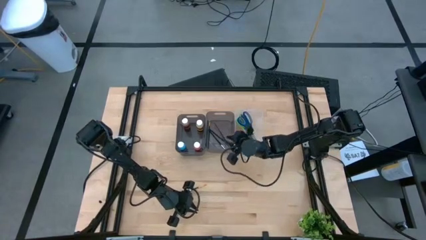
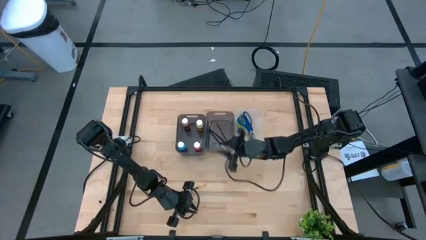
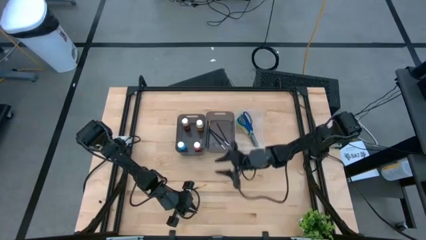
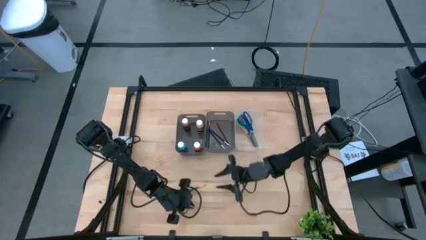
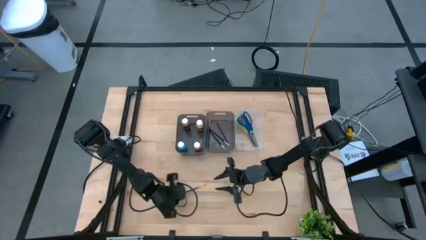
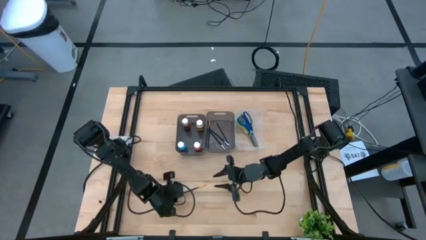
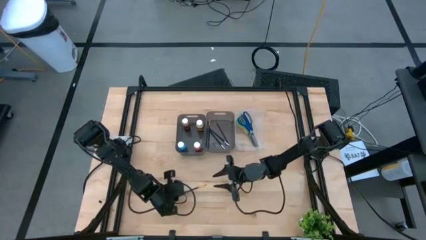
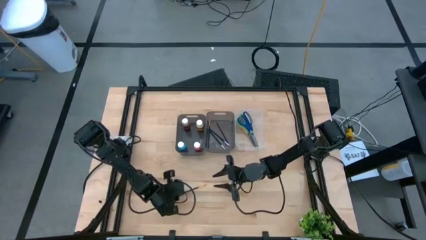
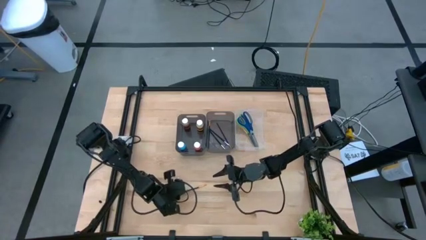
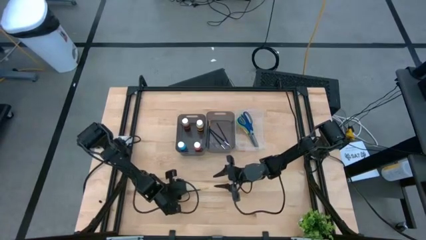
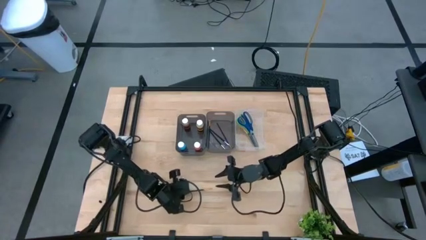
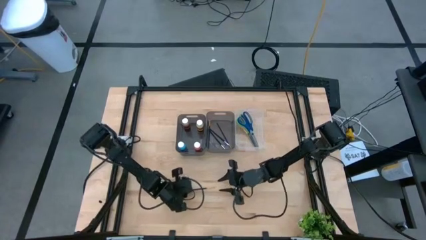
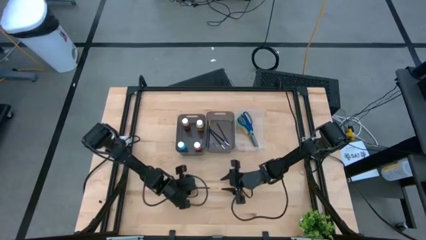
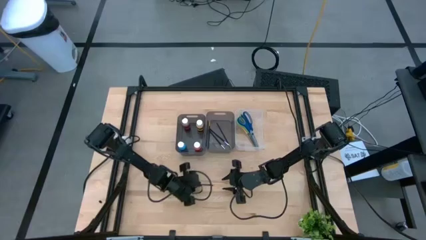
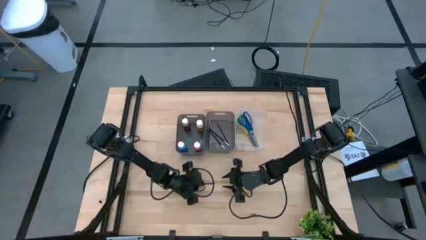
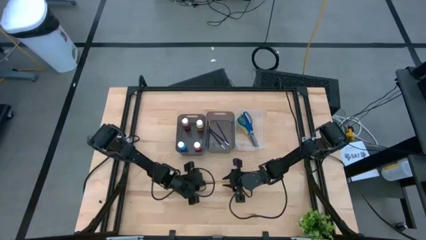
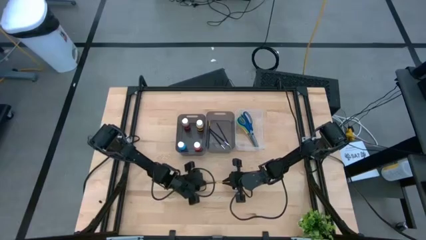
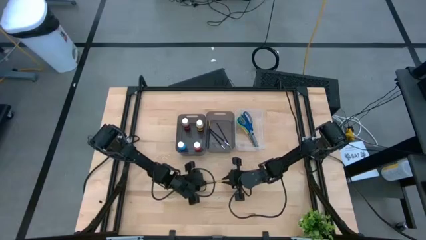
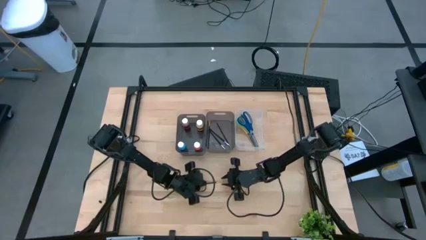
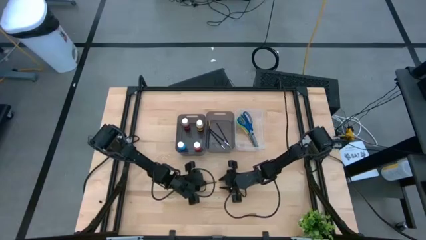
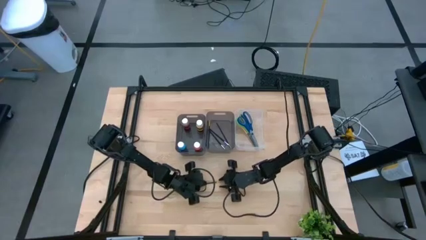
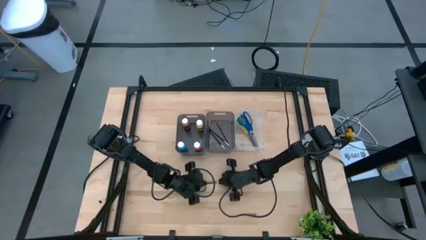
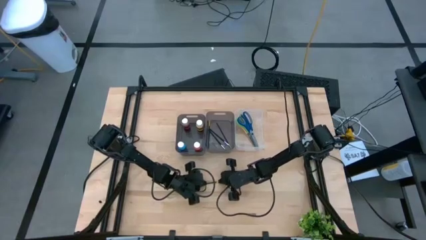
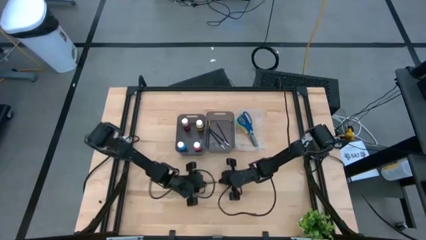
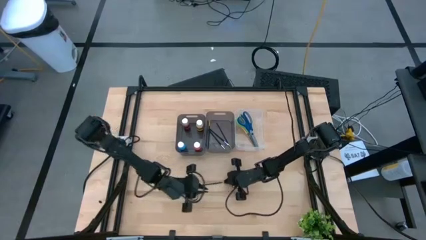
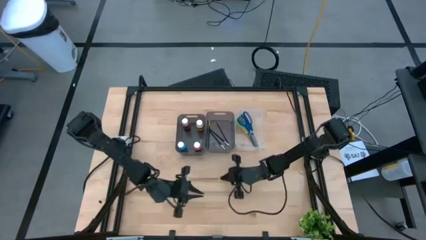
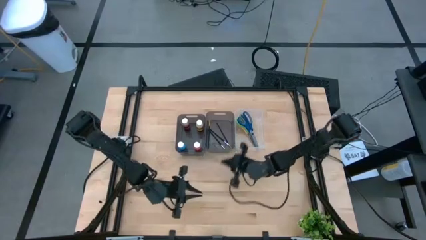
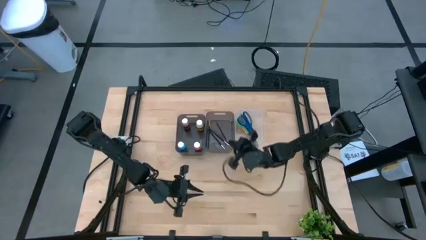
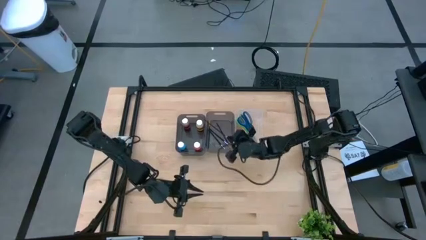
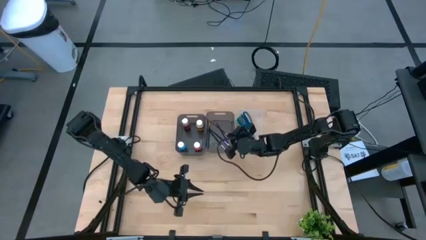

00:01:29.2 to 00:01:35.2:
Task: Pick & Place Paint Supplies
Put the gold paintbrush into the right black bin

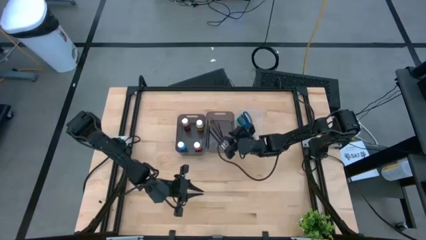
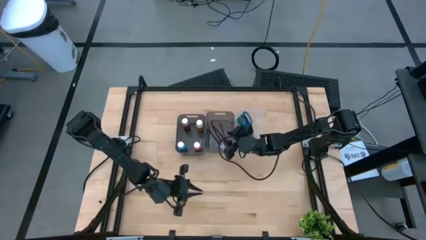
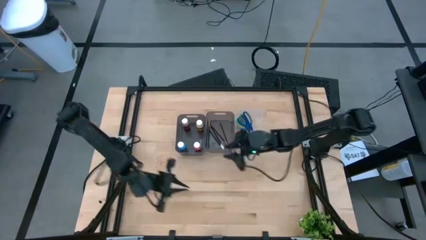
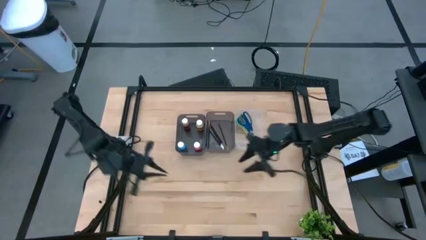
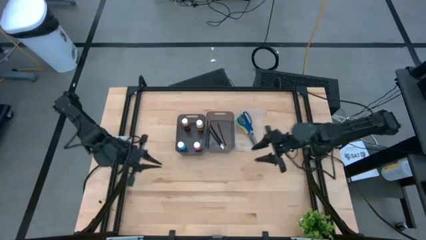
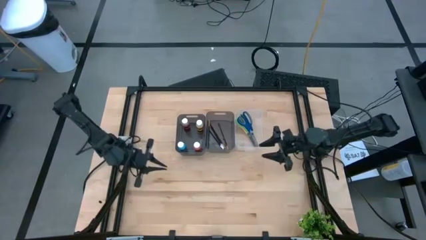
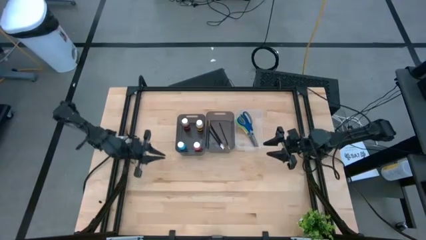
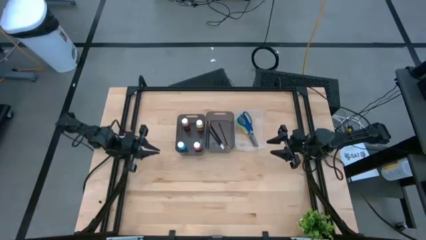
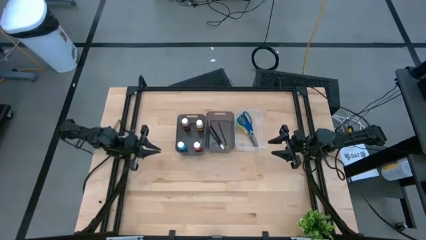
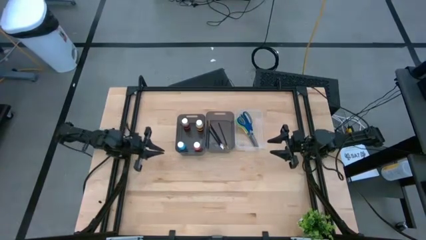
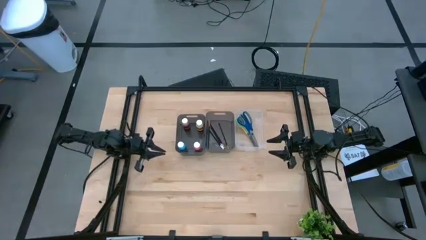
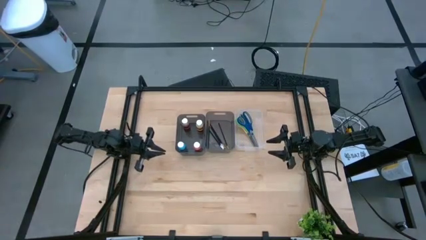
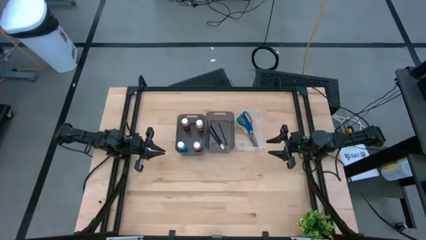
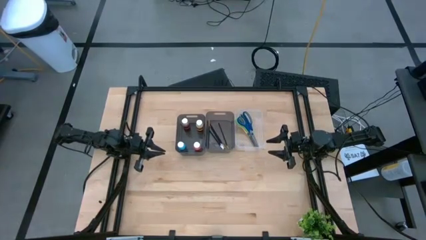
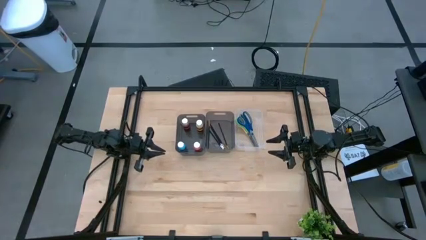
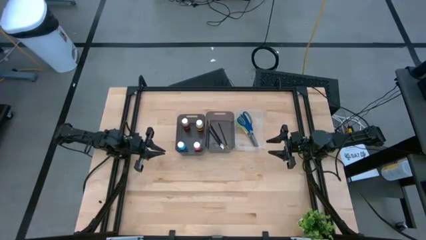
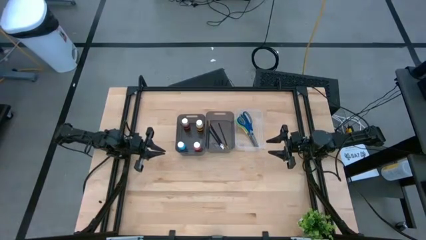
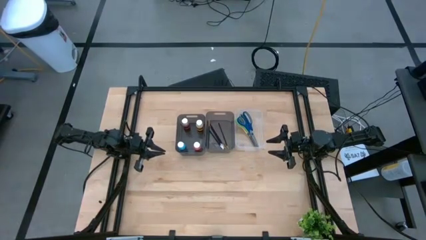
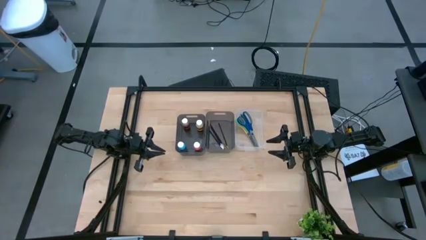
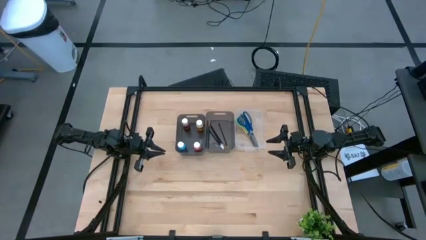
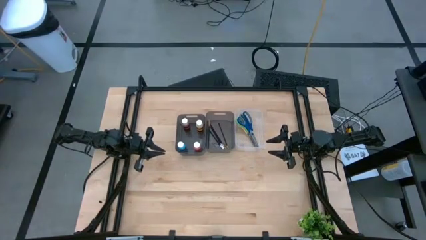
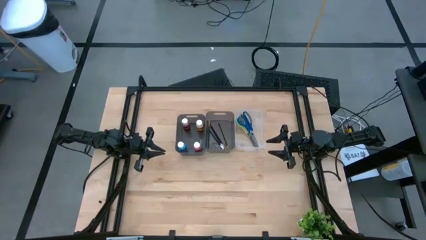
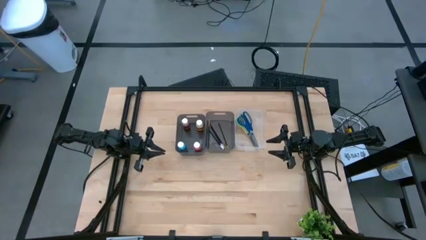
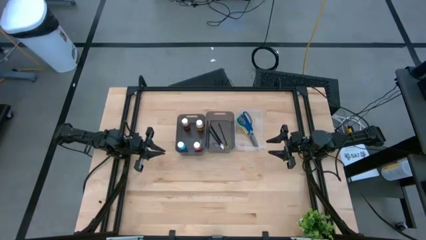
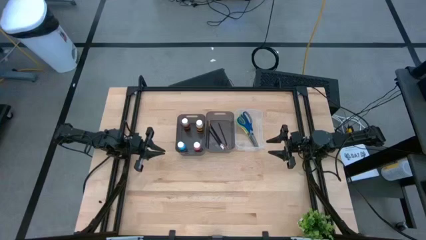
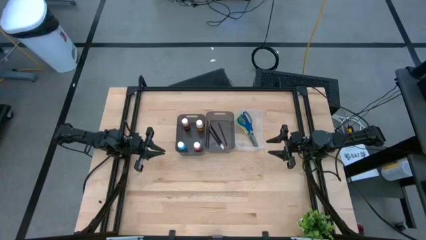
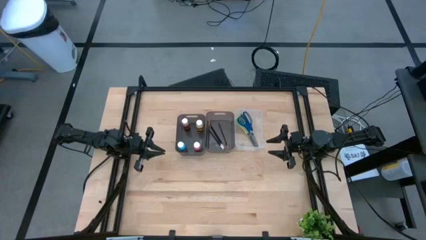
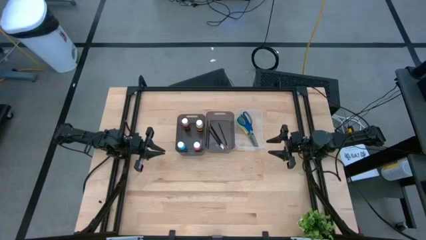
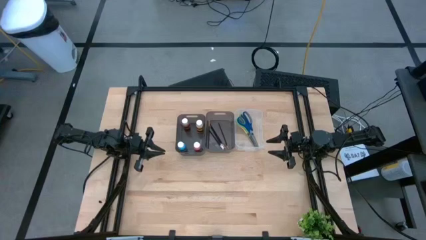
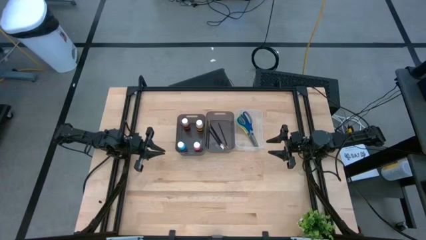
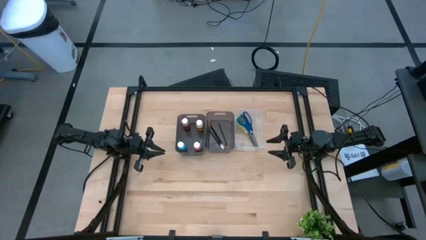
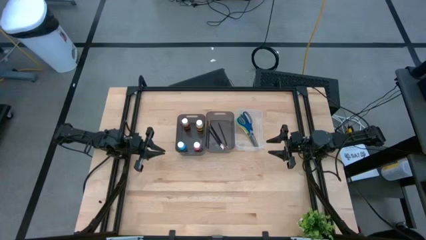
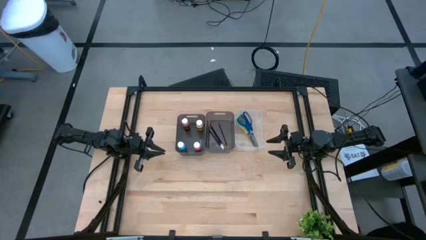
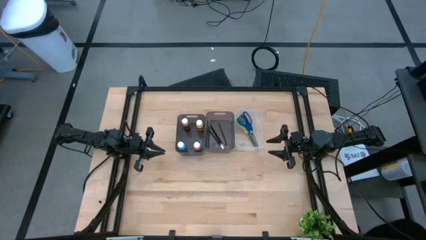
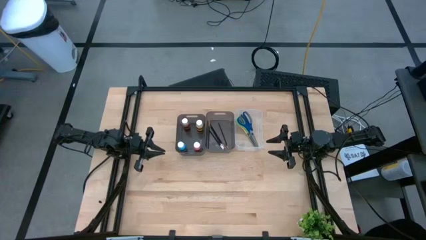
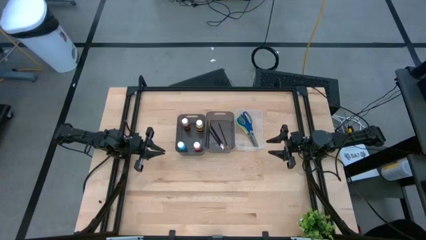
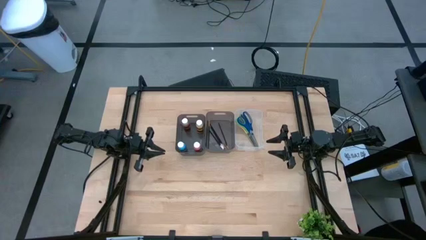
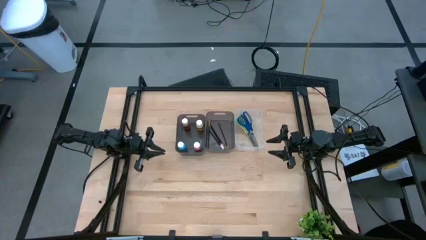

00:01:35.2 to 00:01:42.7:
Return to Home Position
